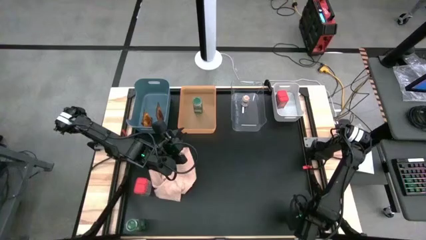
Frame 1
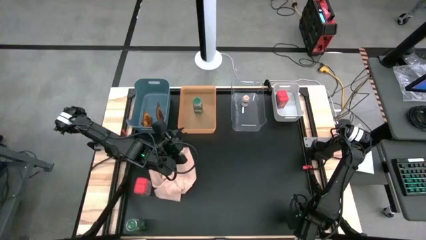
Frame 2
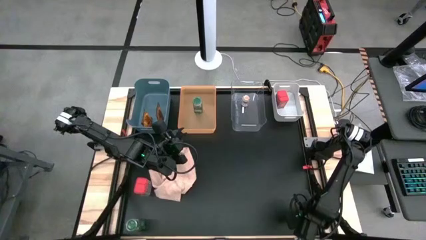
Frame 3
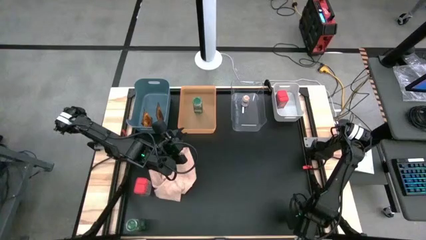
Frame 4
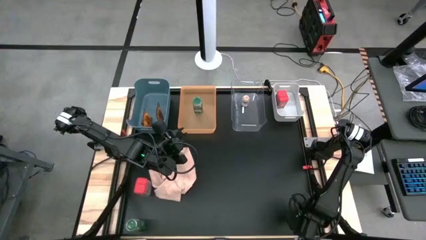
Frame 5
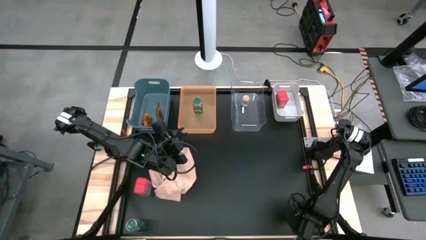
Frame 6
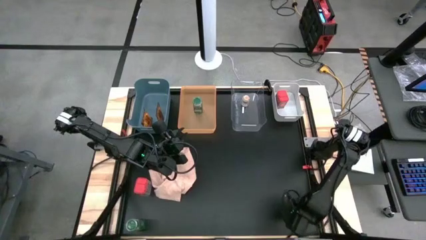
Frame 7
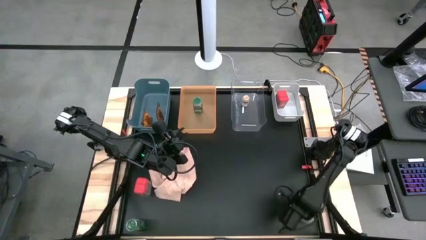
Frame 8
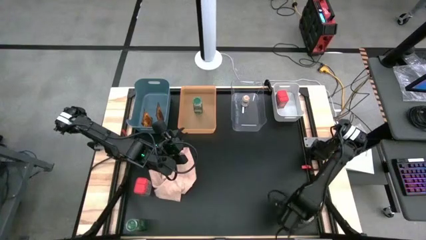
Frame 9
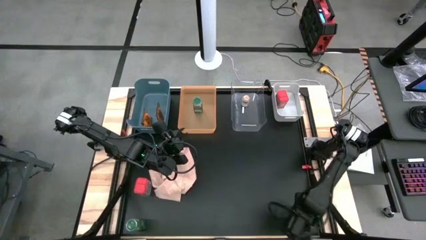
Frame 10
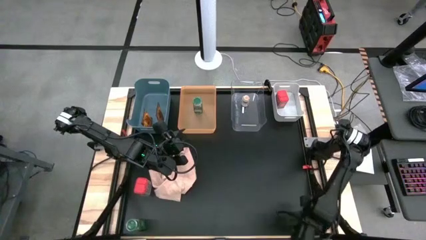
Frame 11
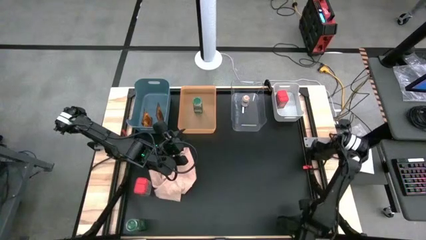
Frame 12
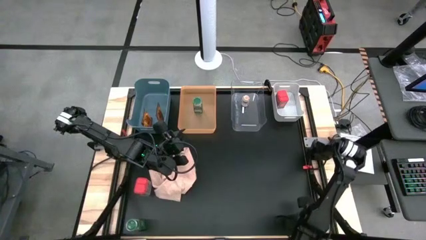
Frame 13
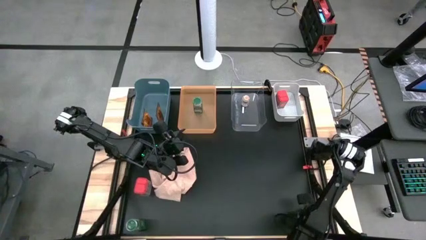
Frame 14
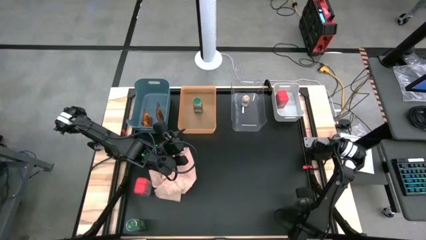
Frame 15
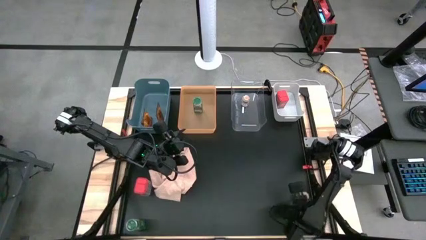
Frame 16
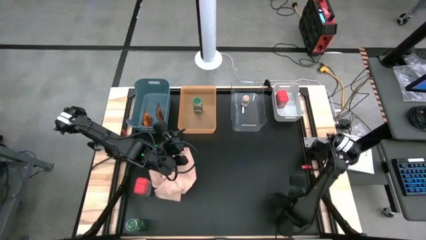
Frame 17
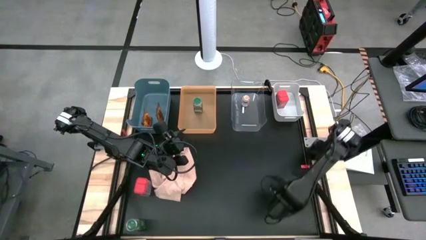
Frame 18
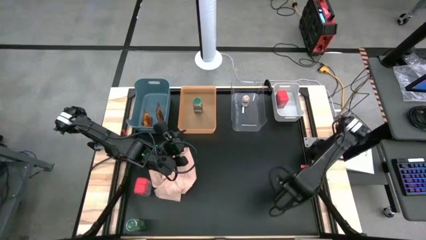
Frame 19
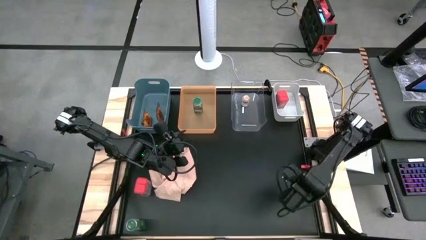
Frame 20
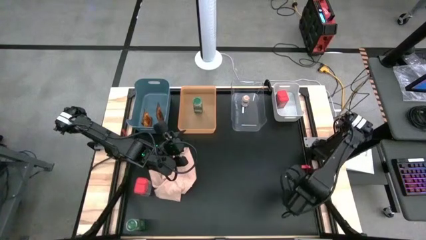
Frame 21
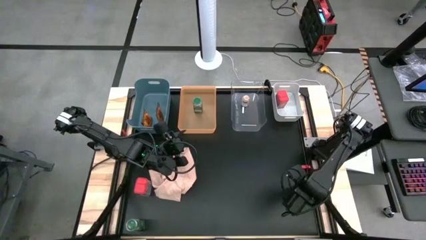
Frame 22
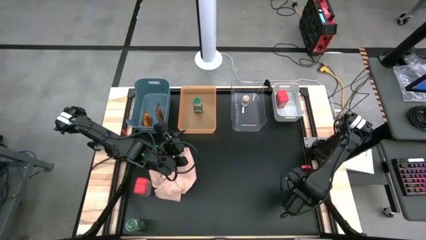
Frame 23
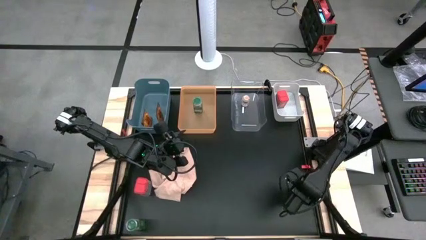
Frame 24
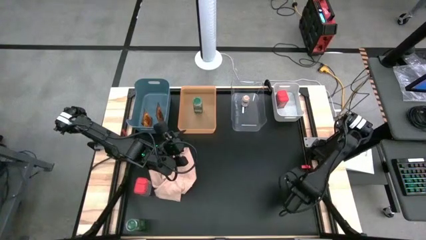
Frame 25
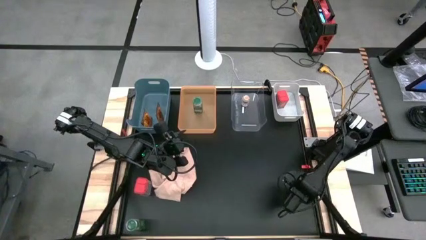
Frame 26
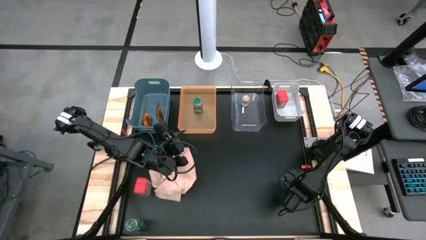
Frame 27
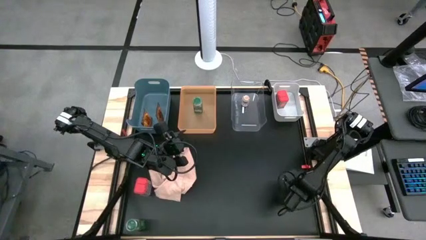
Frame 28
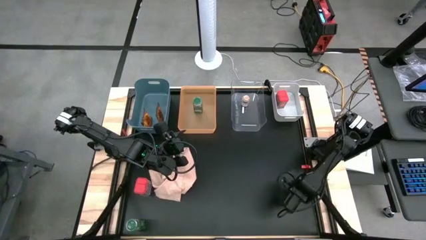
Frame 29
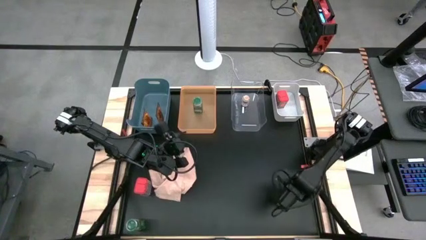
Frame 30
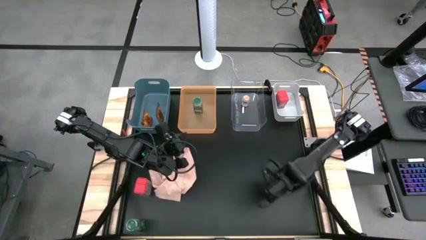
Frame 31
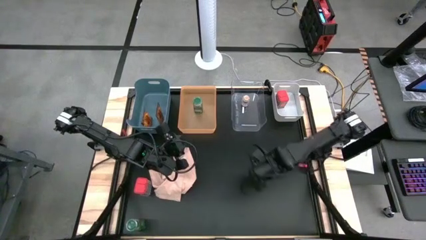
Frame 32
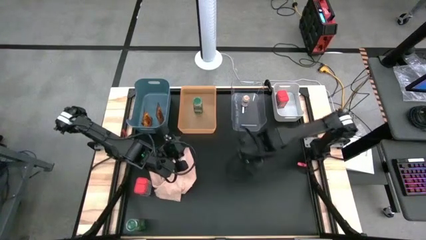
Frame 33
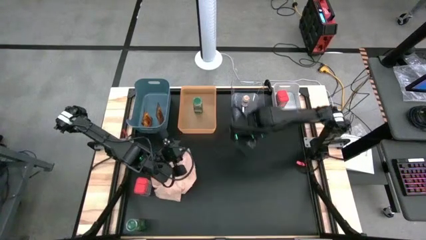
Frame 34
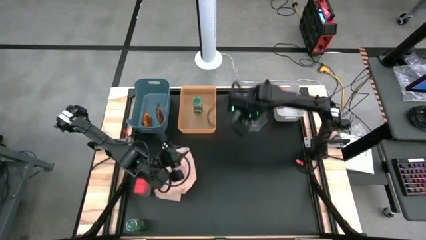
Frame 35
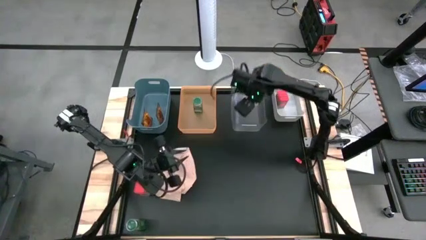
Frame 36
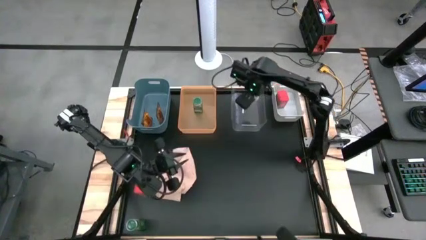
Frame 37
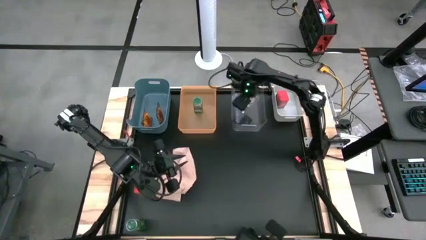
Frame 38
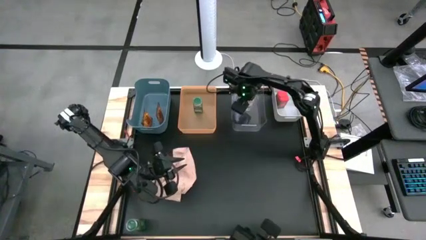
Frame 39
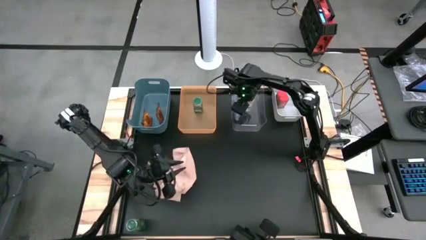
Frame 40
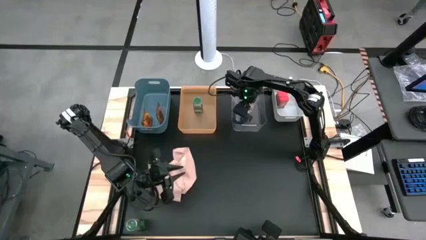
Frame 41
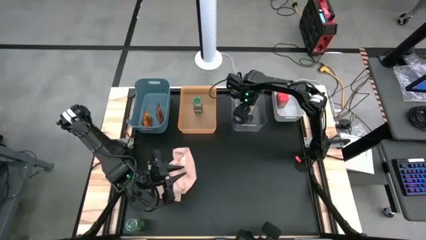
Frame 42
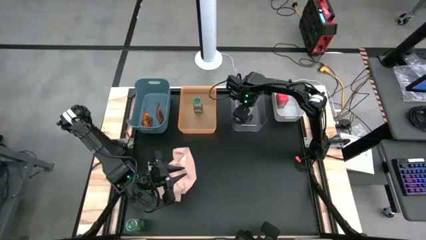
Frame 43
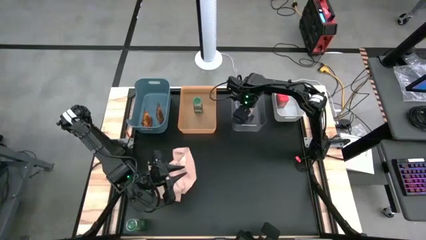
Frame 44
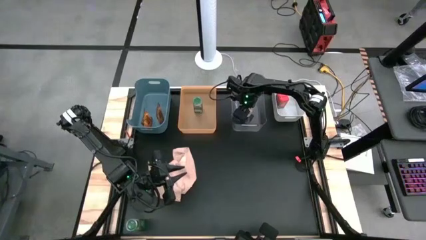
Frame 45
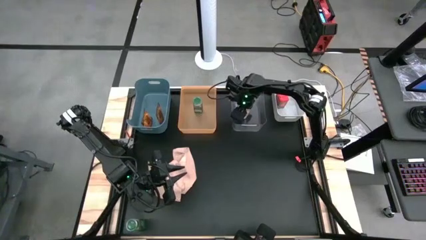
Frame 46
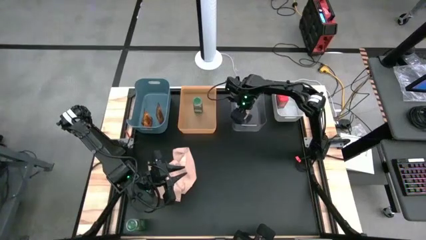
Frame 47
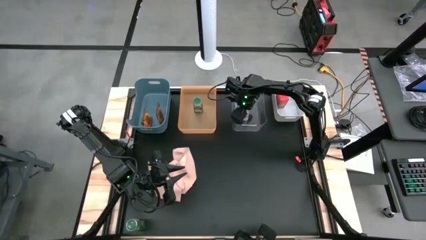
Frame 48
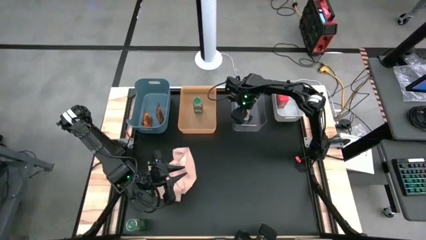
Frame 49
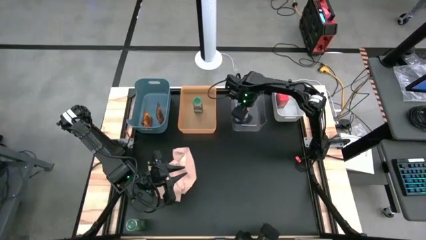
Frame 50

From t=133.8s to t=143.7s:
Task: Sort spices by type
Put the brown seasoning bottle into the transparent bin

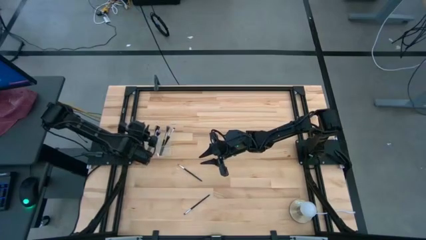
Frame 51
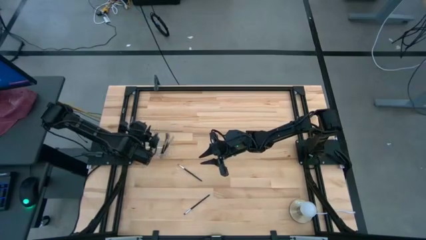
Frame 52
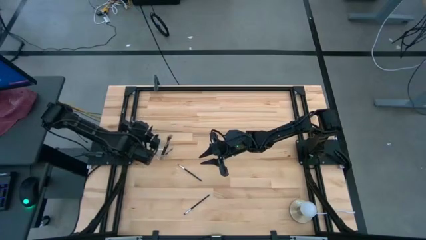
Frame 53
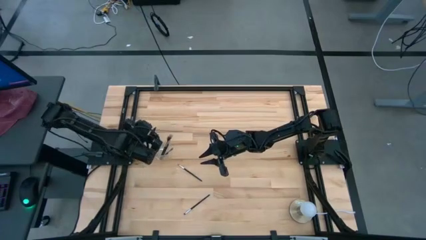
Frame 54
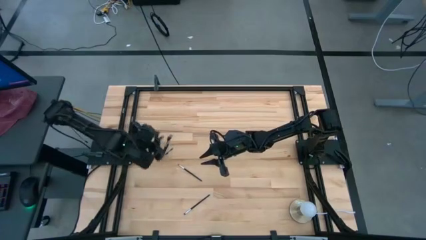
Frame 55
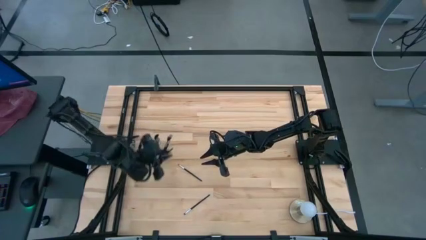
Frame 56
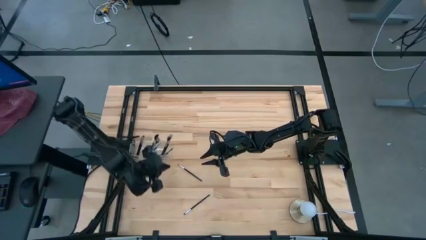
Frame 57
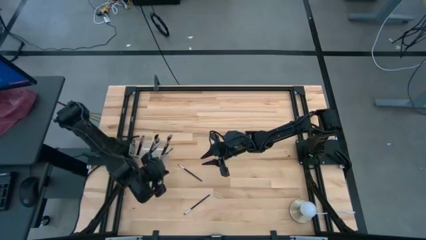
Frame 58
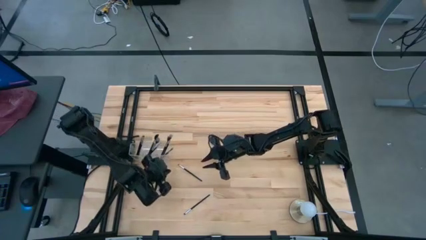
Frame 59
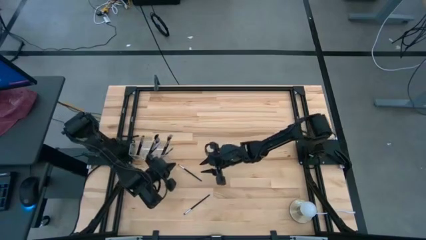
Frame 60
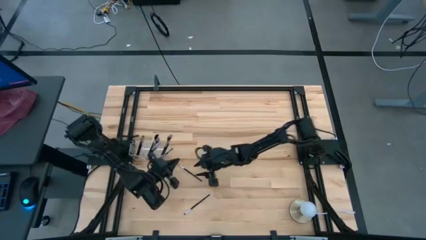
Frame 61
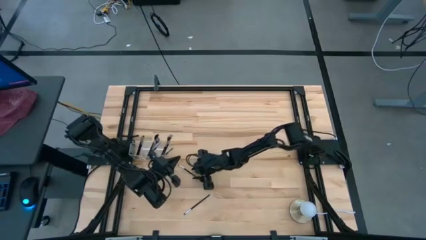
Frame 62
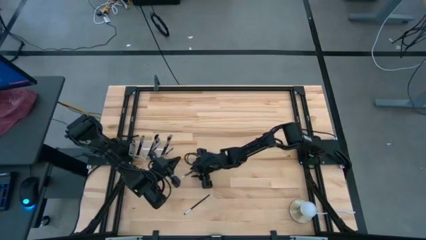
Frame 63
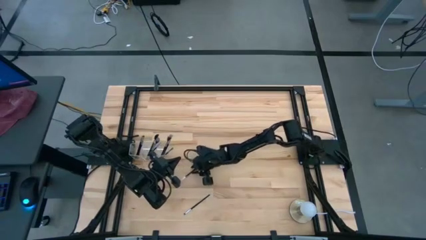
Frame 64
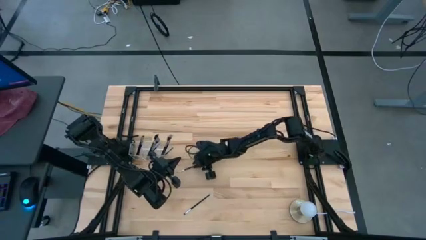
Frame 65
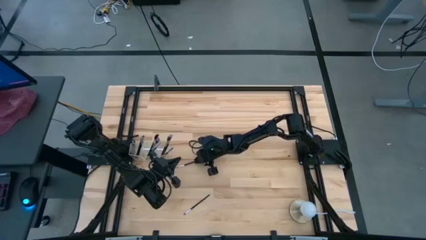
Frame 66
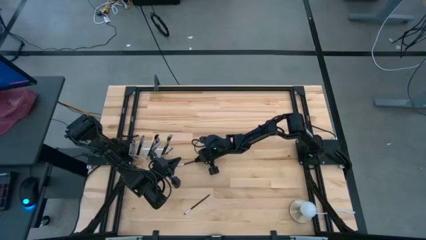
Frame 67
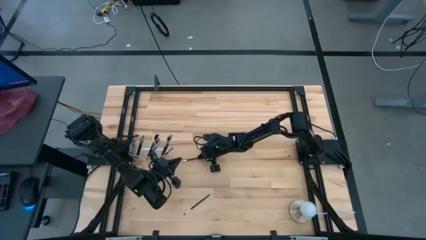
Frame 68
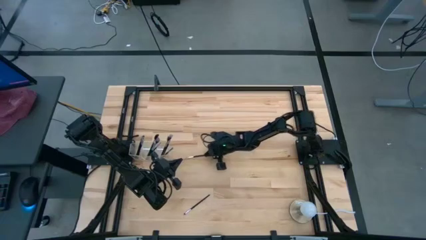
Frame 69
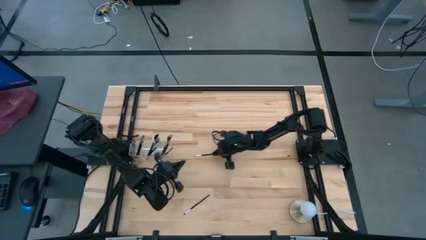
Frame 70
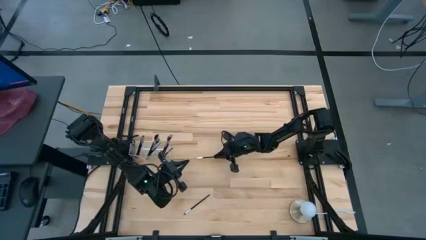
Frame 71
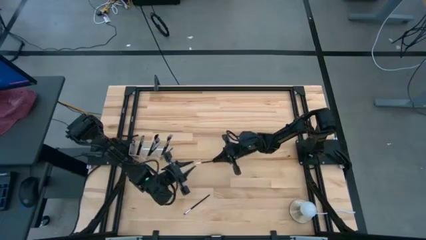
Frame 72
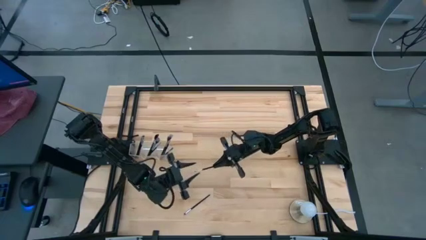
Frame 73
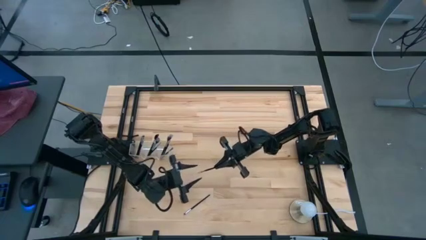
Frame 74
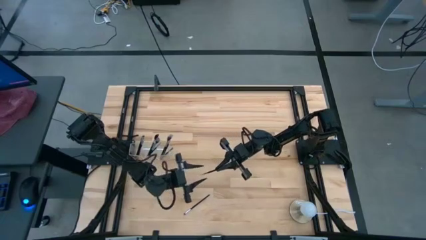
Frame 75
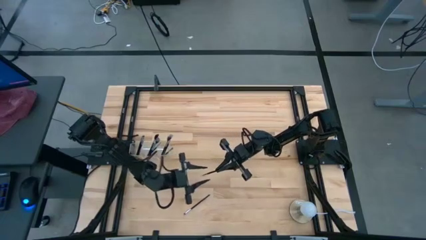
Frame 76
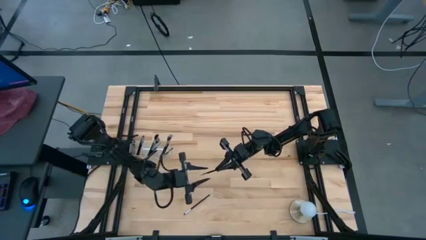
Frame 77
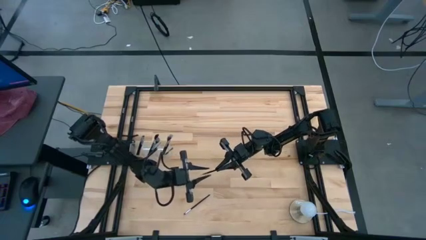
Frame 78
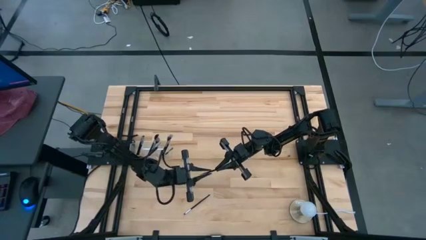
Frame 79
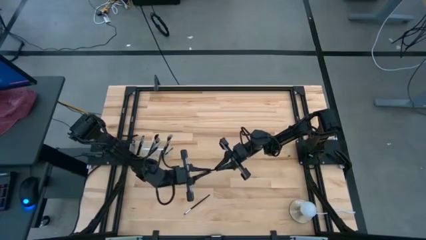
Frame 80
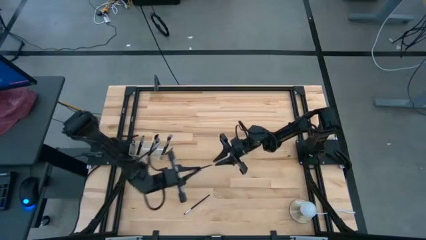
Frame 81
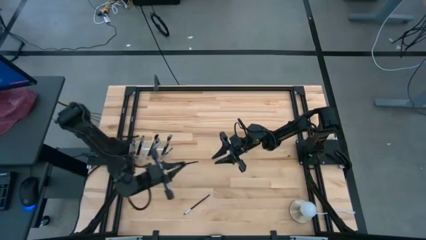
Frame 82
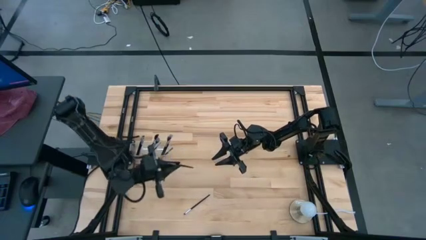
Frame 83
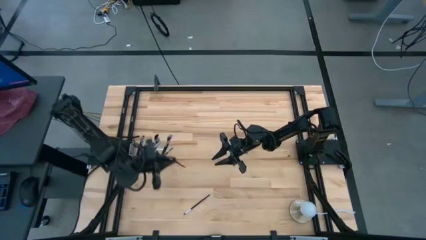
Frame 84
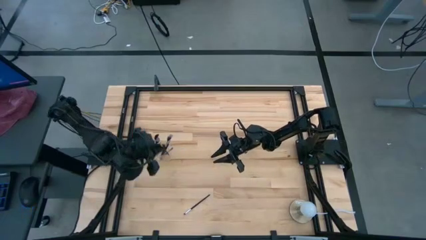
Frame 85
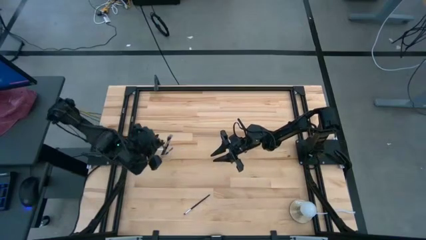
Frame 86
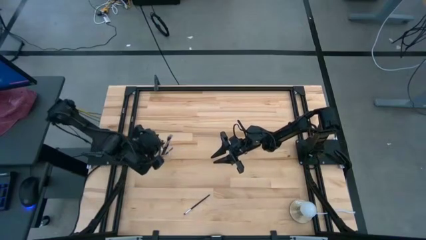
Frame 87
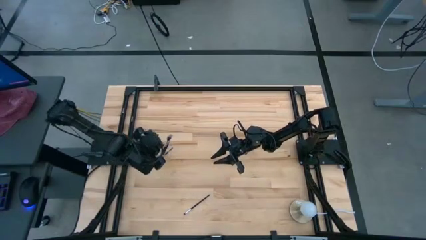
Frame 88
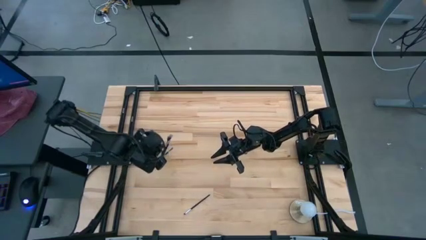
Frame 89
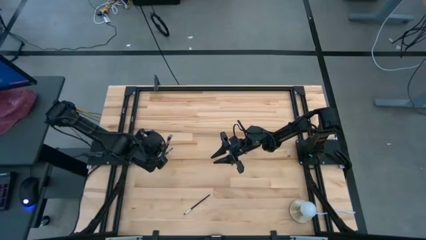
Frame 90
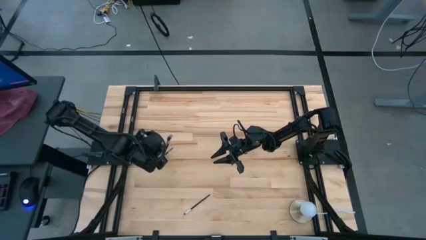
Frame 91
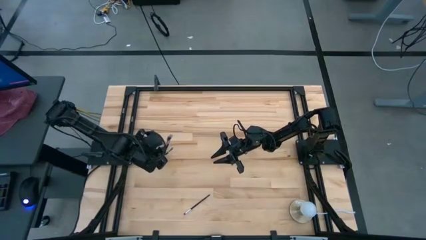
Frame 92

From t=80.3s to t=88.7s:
Task: Put items in baskets/containers
Put the black eyeshadow brush into the transparent organizer
